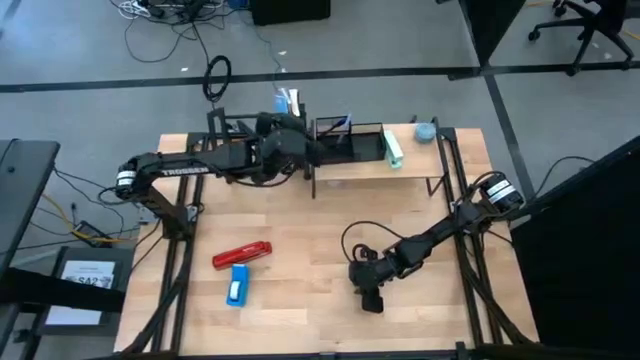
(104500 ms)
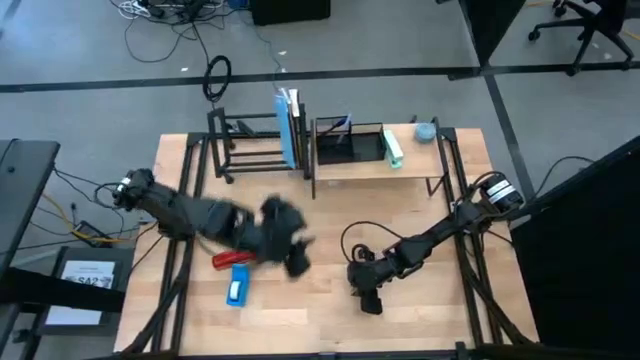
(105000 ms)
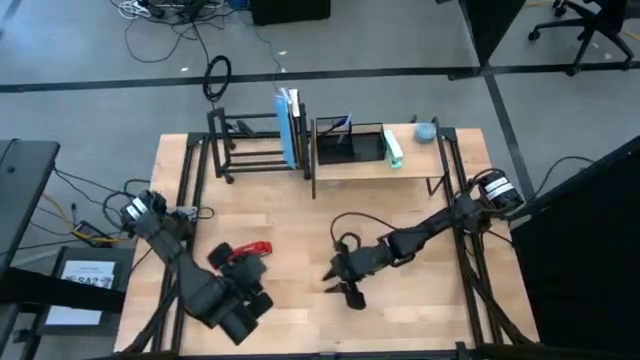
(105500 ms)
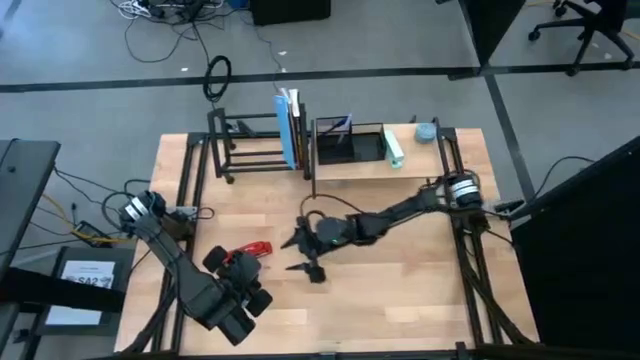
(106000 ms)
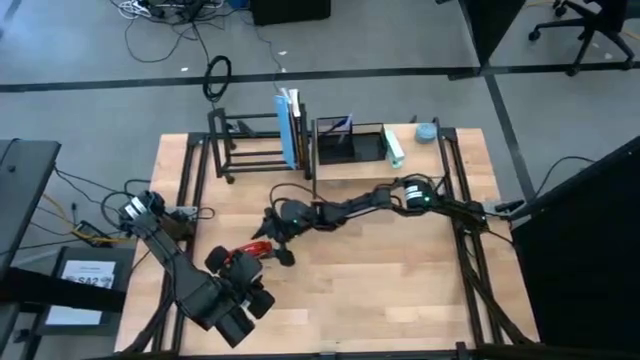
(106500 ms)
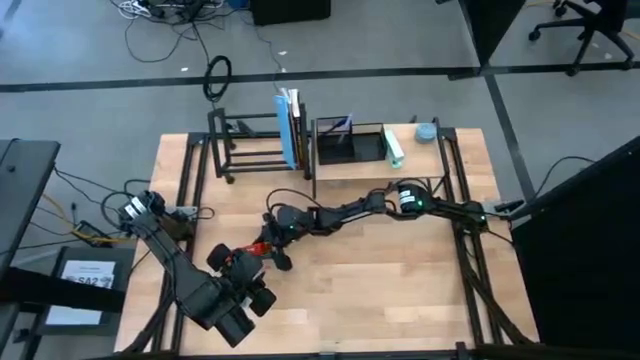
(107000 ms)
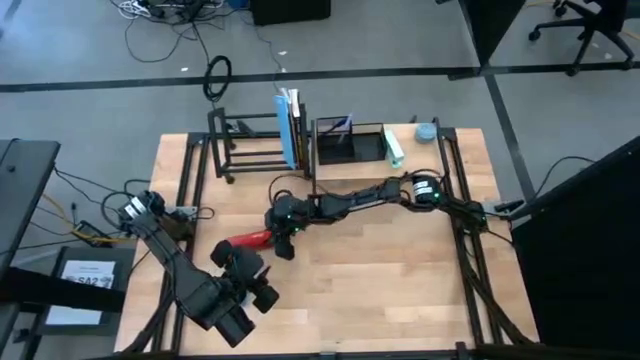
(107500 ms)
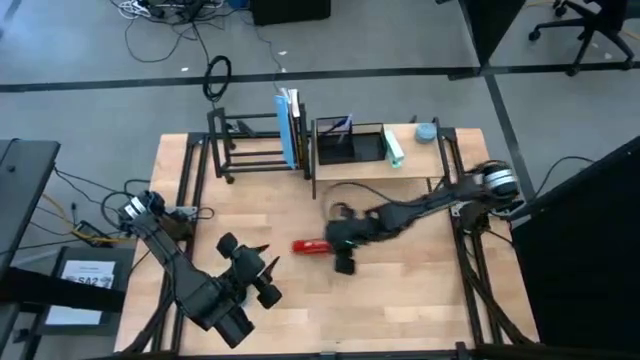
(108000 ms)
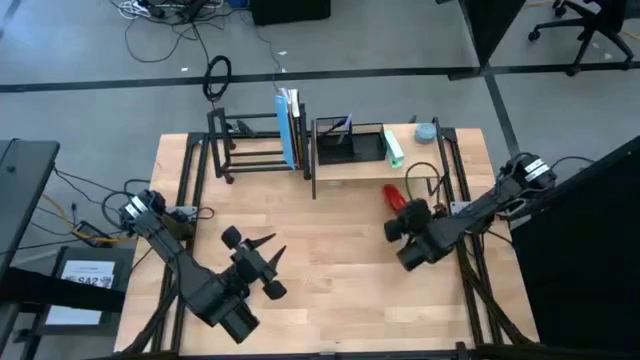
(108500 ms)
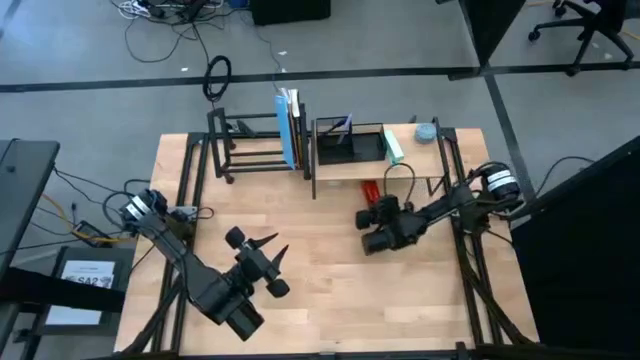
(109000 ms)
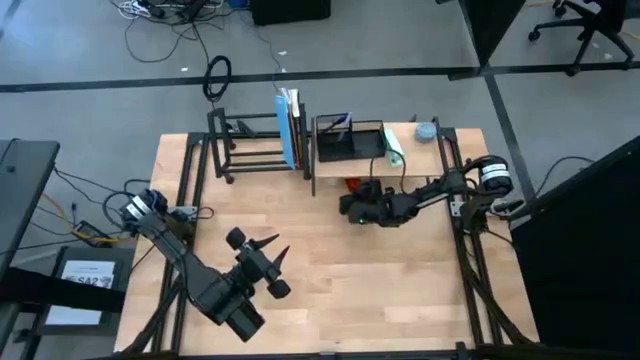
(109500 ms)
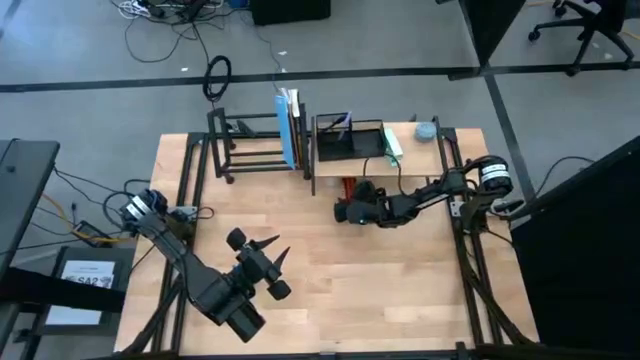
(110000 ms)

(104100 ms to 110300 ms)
Task: Stock shelves
Put the red stapler under the shelf

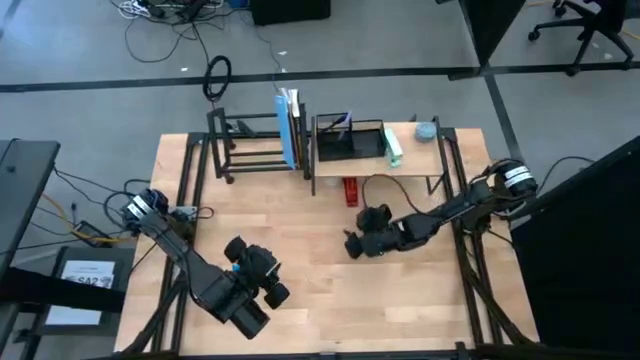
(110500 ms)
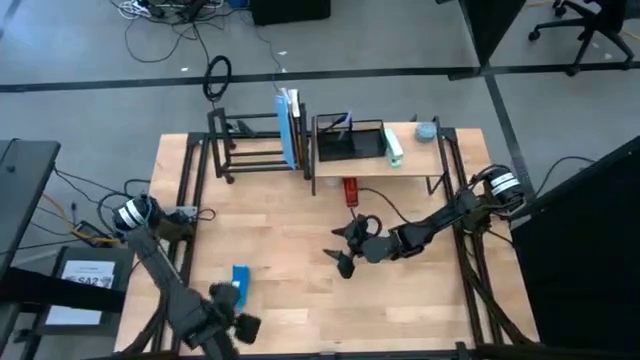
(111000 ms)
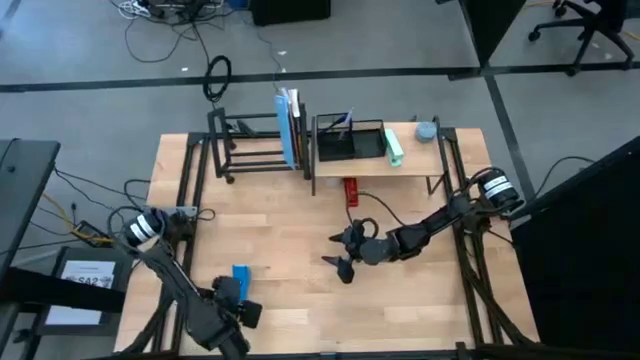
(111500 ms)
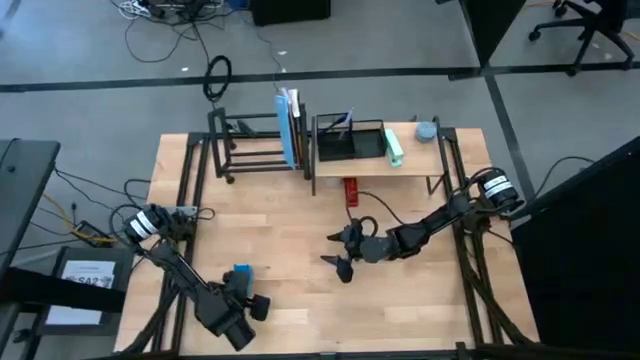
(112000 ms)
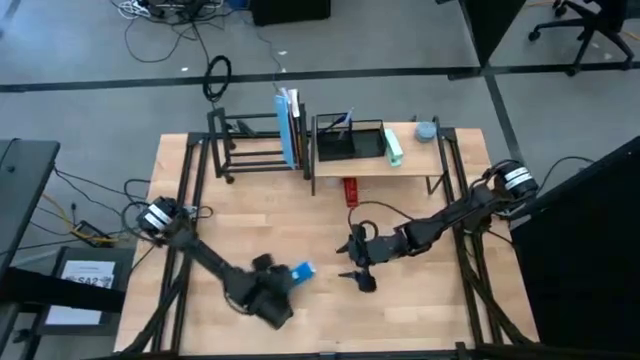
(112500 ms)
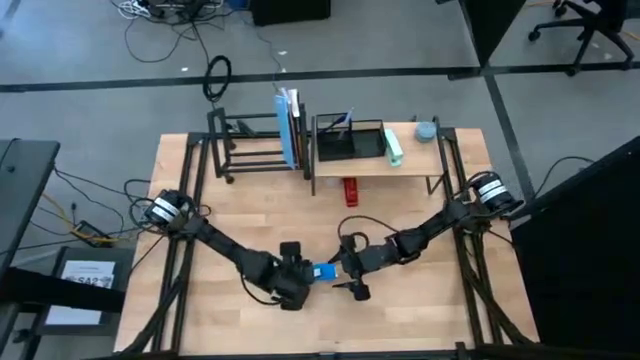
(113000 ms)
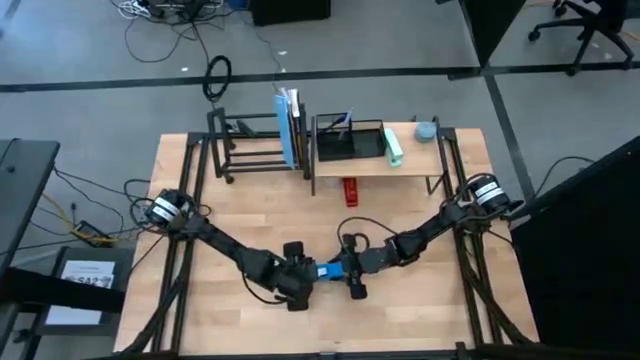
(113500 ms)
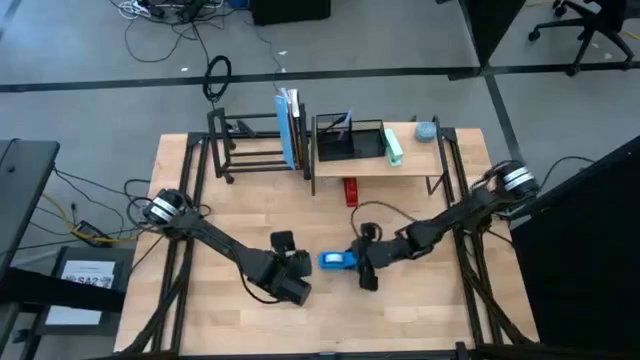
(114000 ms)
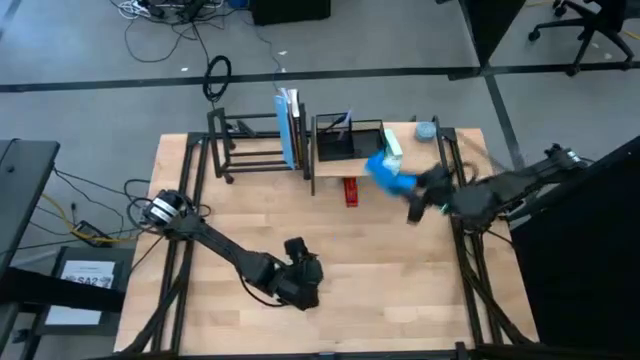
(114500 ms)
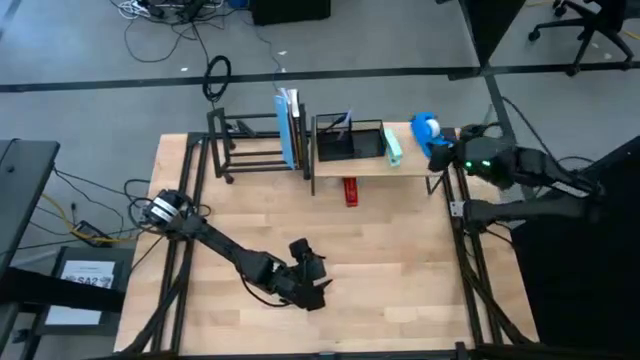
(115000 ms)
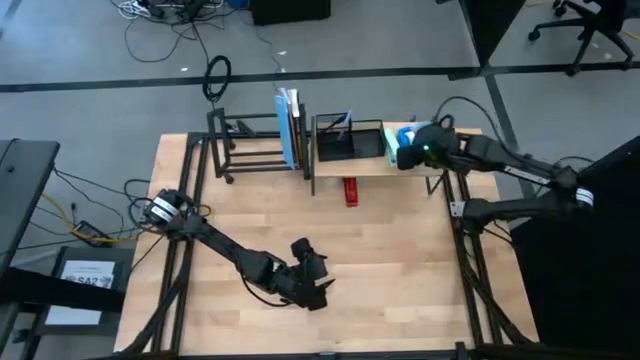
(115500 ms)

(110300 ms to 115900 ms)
Put the blue tape dispenser on the shelf

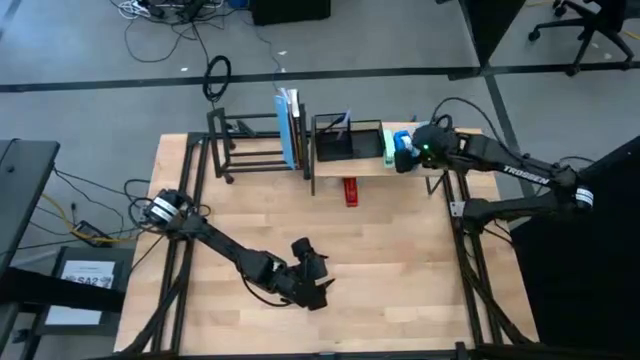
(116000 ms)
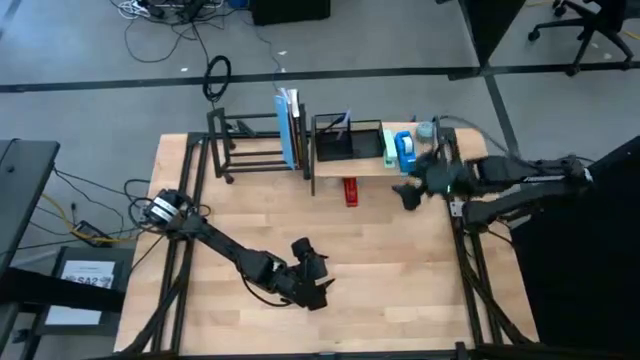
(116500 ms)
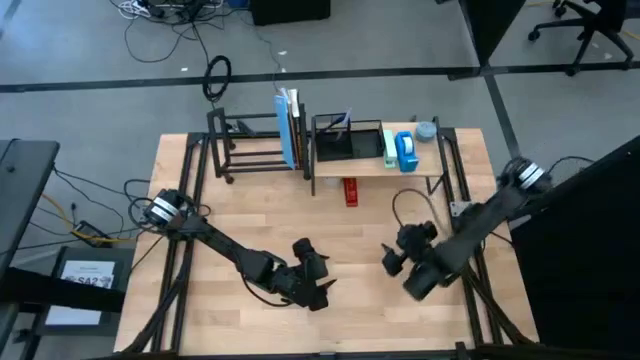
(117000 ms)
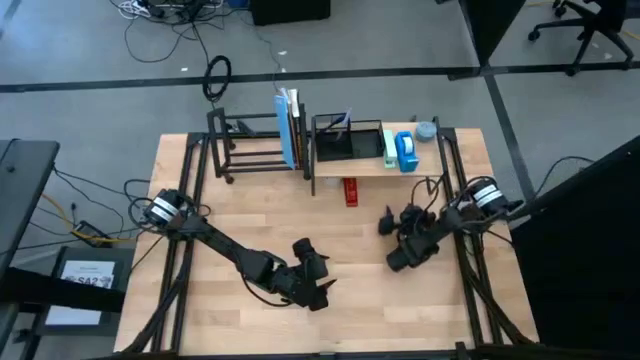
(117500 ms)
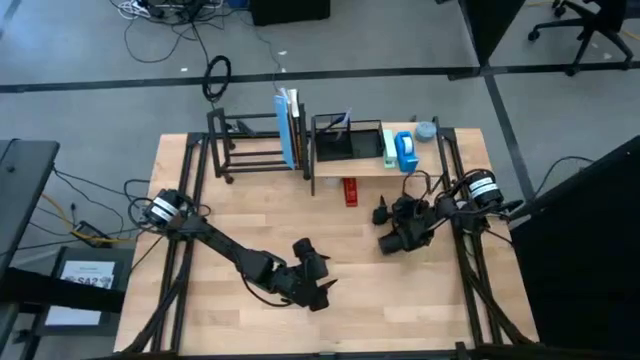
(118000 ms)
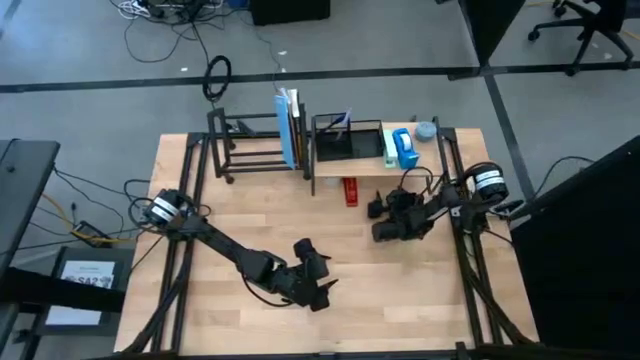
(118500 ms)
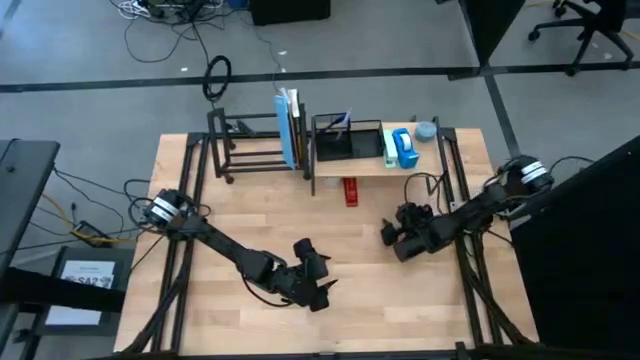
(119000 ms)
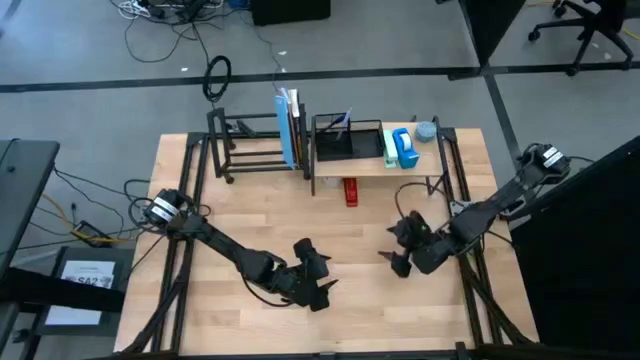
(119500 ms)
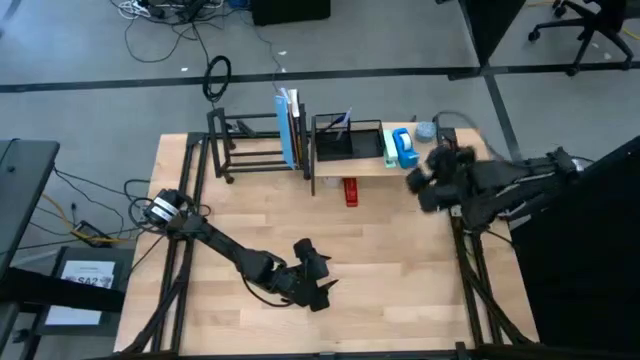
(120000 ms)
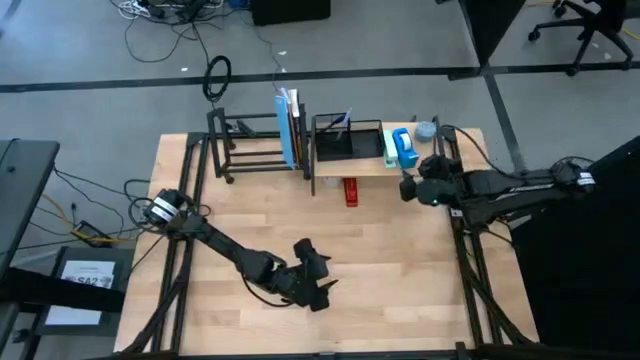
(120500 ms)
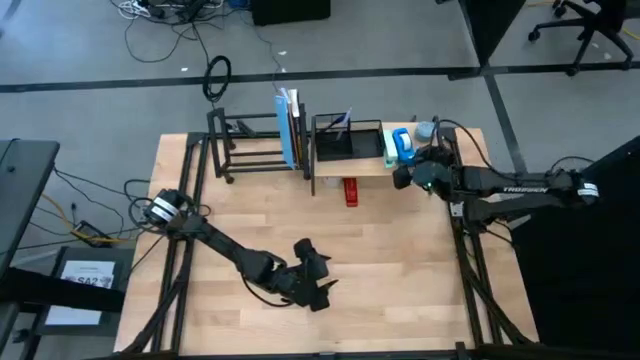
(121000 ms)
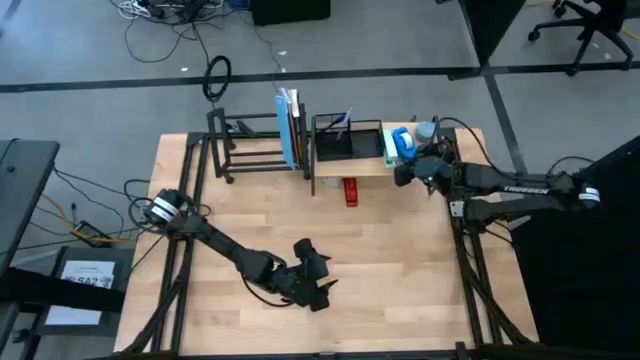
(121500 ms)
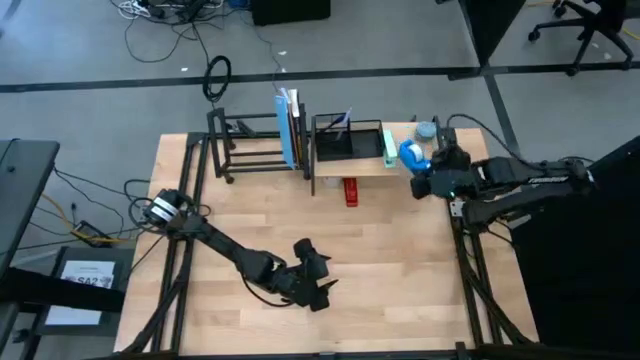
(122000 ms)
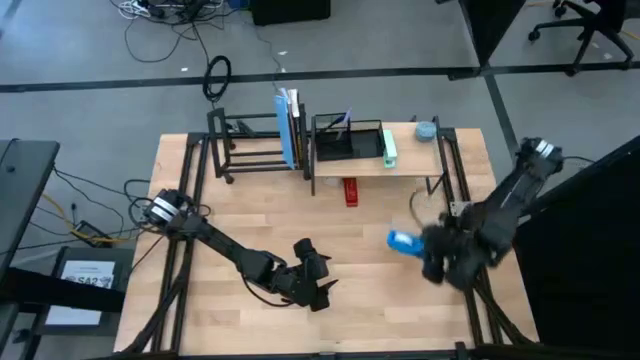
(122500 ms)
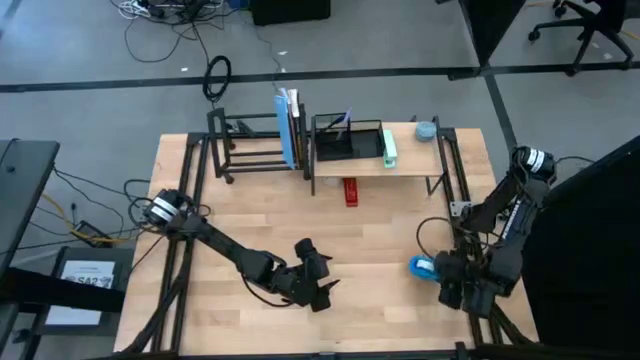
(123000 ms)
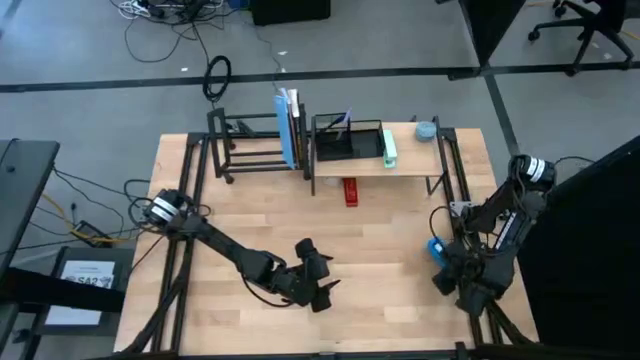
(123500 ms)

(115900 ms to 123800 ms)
Remove the blue tape dispenser from the shelf

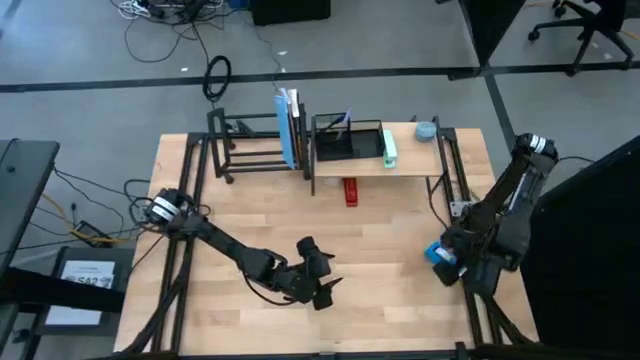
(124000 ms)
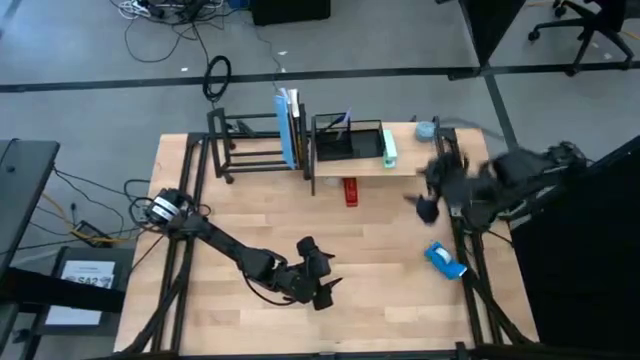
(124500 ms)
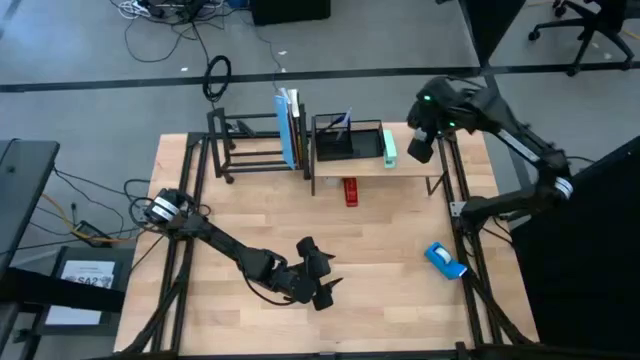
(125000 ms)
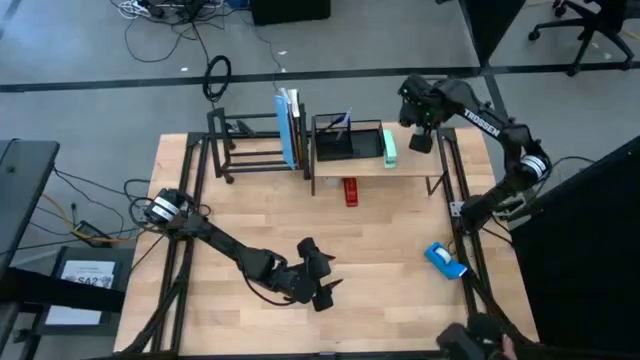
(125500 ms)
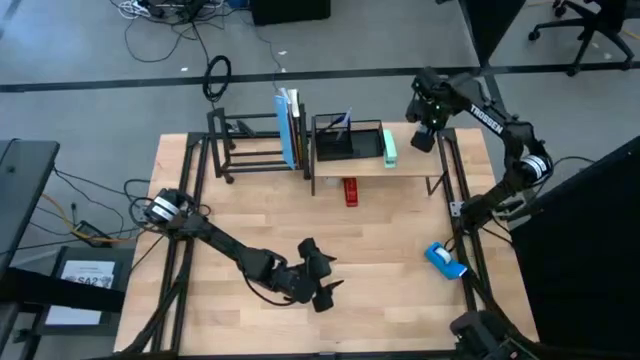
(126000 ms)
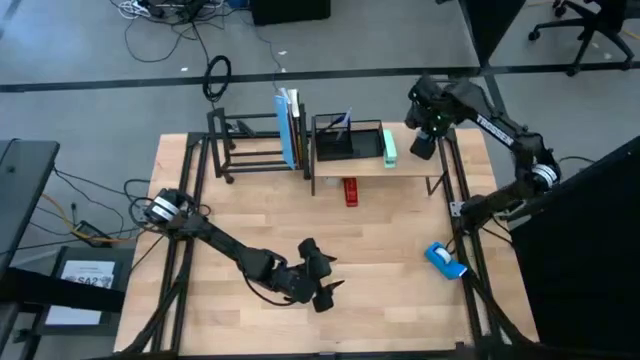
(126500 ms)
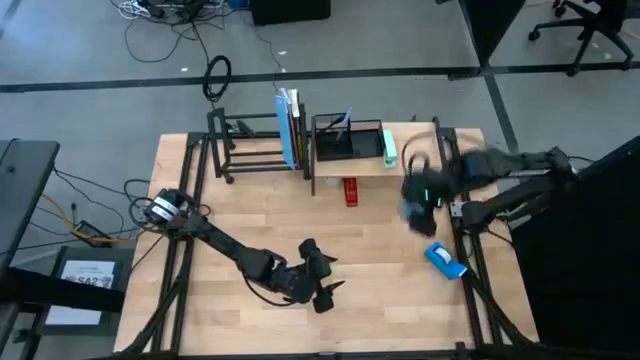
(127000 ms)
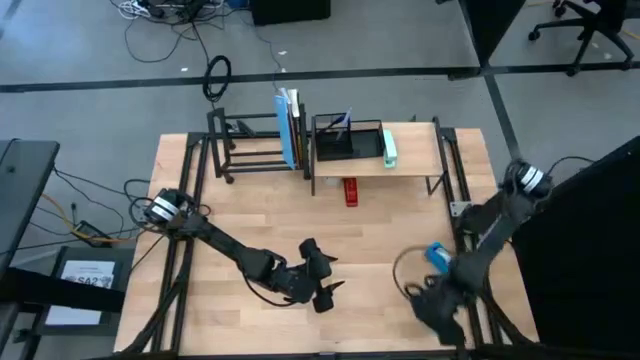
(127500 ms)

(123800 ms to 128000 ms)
Remove the blue scented candle from the shelf
